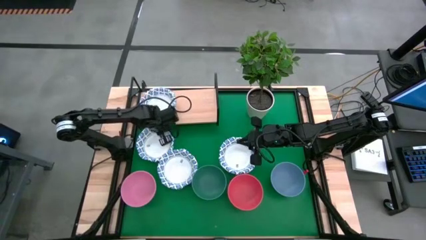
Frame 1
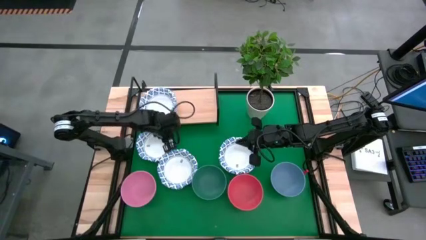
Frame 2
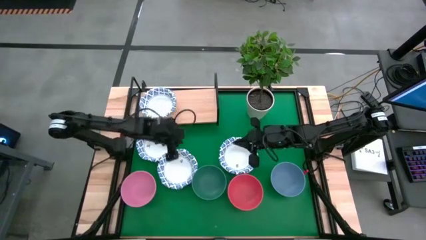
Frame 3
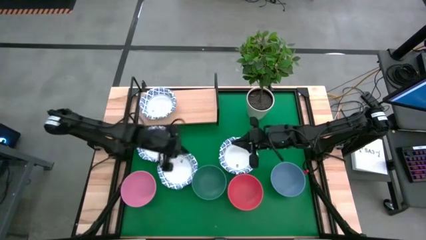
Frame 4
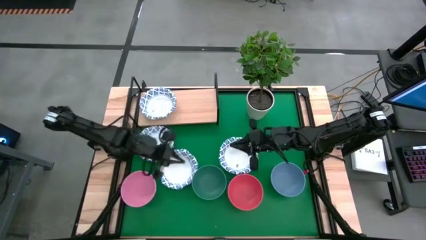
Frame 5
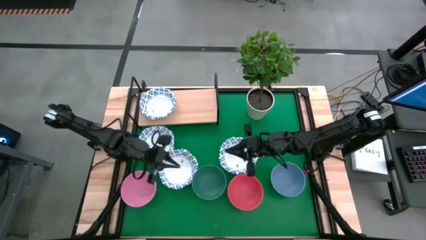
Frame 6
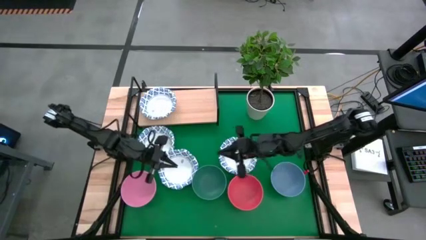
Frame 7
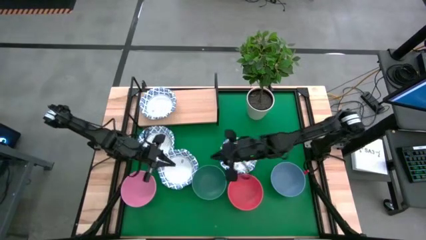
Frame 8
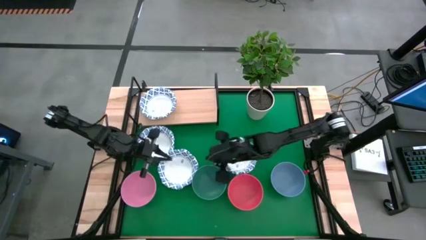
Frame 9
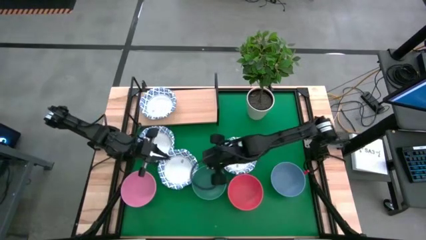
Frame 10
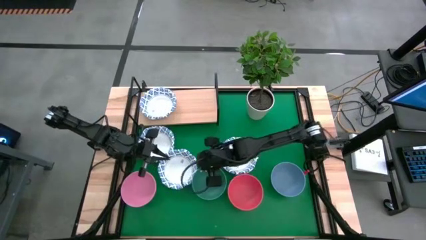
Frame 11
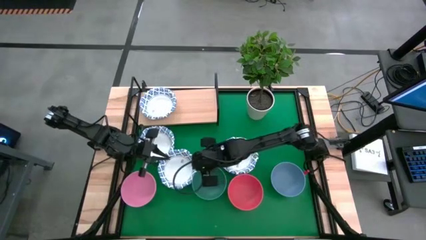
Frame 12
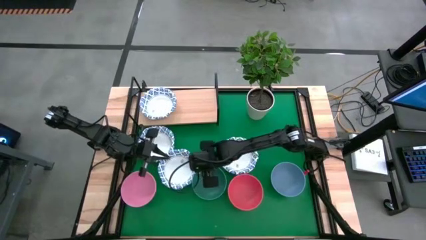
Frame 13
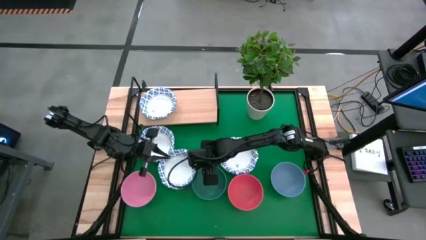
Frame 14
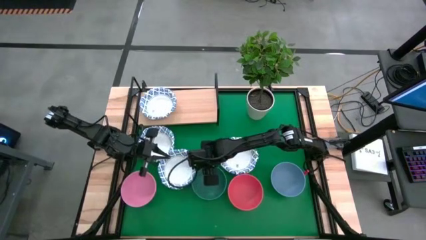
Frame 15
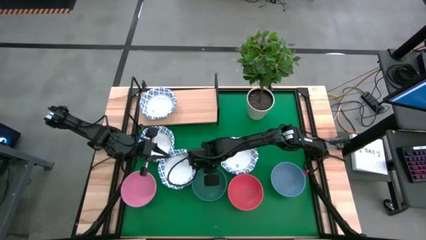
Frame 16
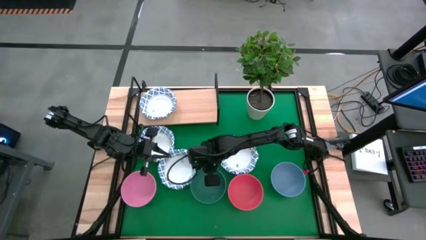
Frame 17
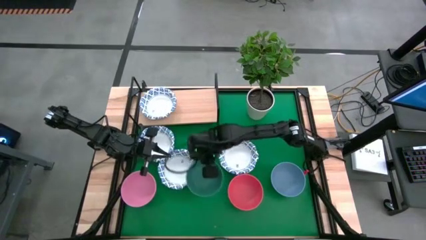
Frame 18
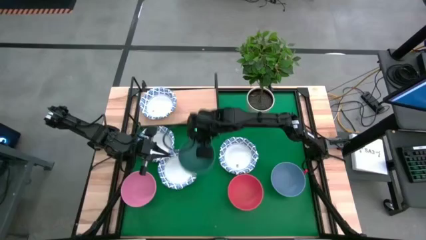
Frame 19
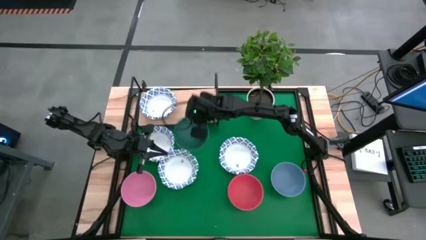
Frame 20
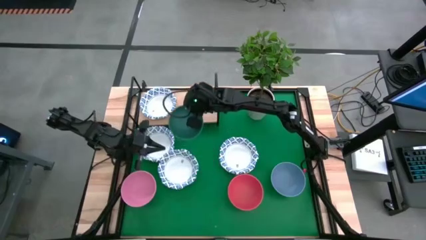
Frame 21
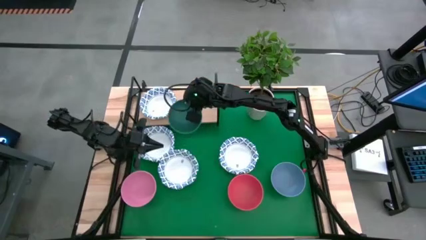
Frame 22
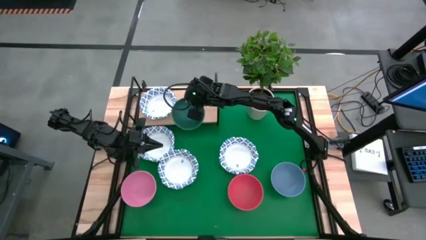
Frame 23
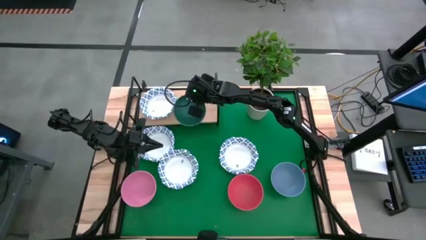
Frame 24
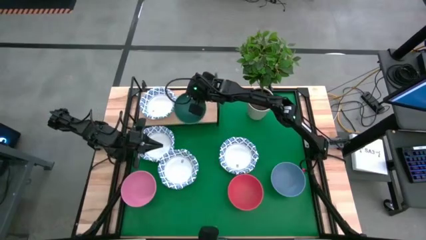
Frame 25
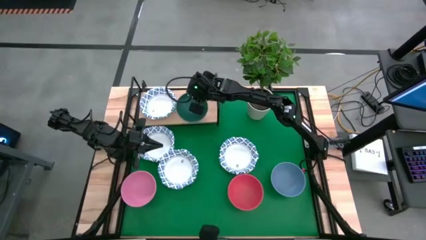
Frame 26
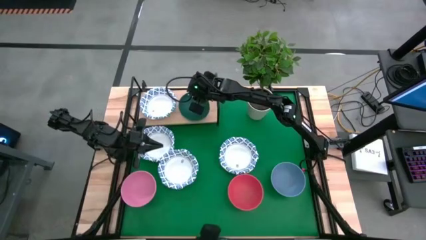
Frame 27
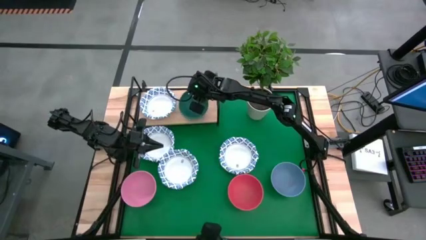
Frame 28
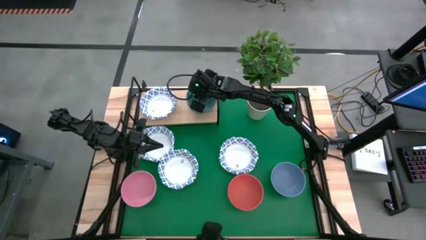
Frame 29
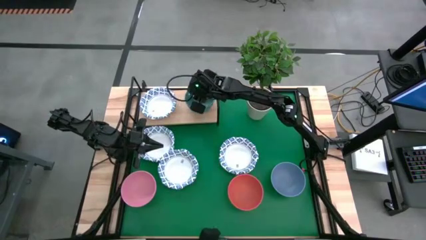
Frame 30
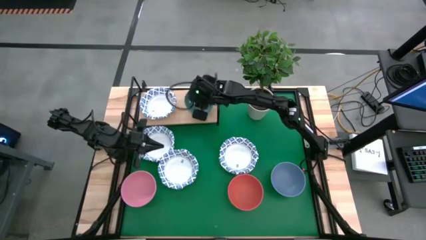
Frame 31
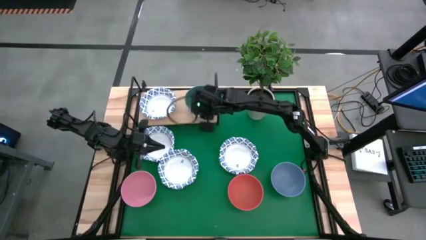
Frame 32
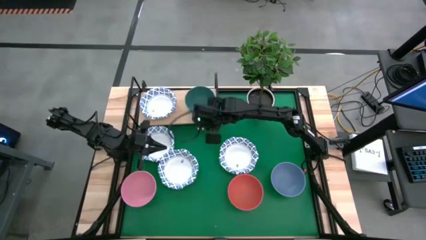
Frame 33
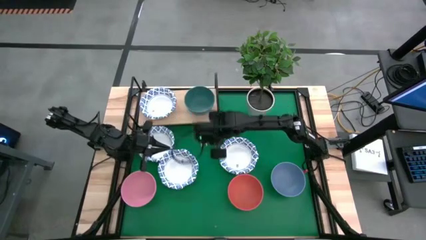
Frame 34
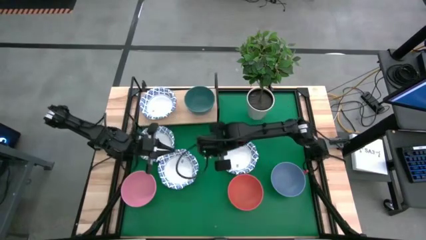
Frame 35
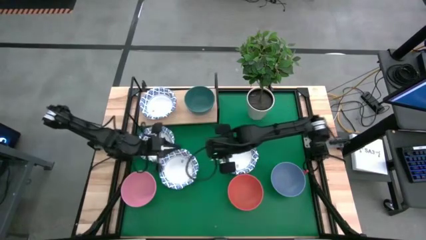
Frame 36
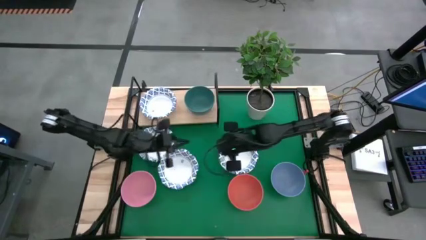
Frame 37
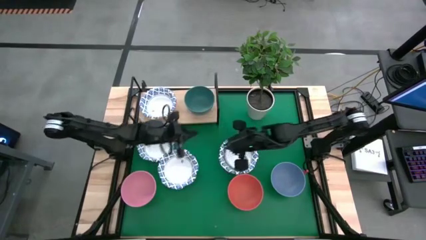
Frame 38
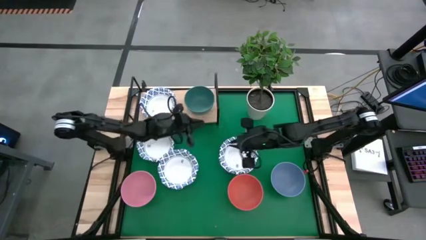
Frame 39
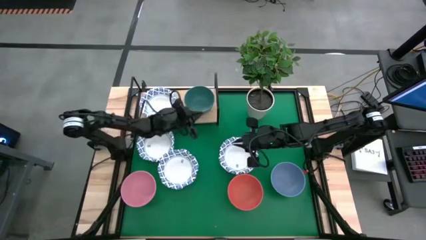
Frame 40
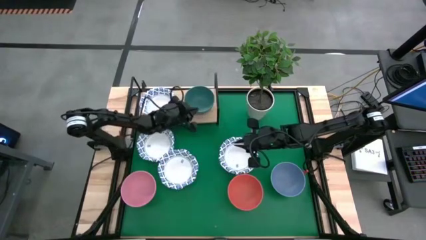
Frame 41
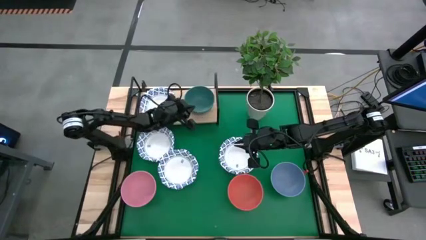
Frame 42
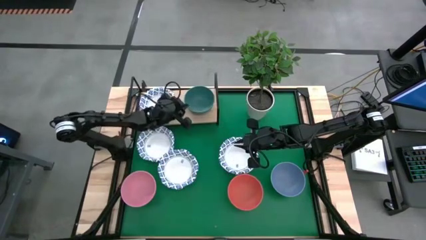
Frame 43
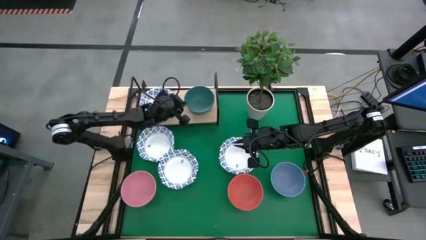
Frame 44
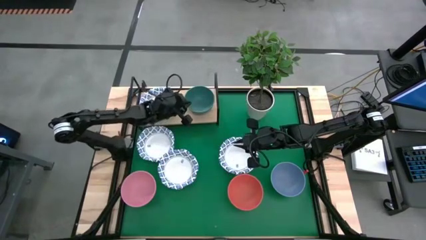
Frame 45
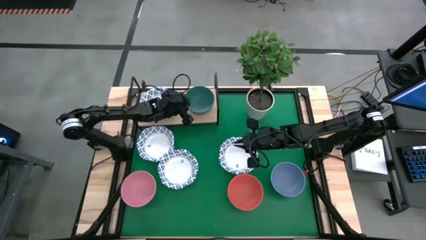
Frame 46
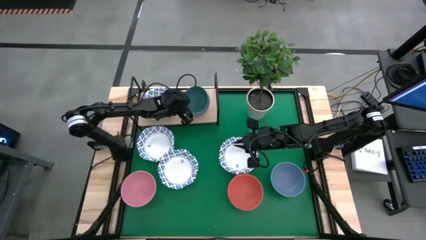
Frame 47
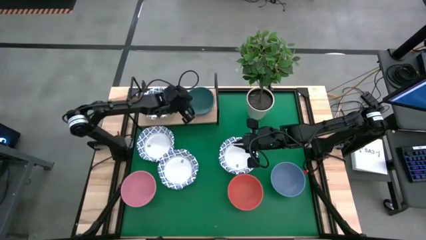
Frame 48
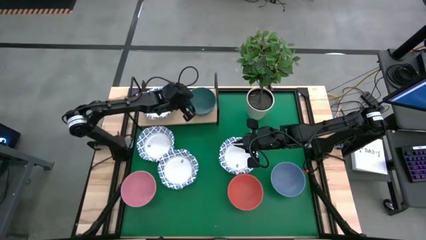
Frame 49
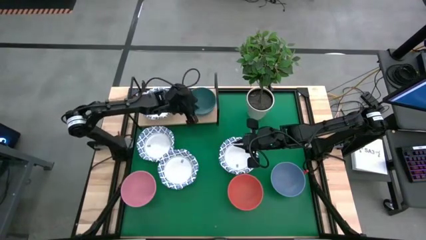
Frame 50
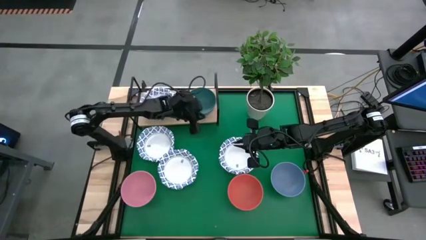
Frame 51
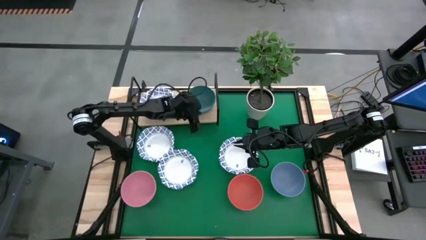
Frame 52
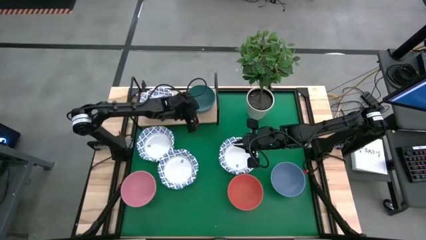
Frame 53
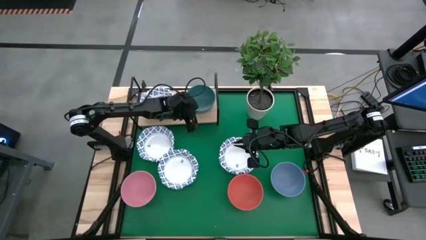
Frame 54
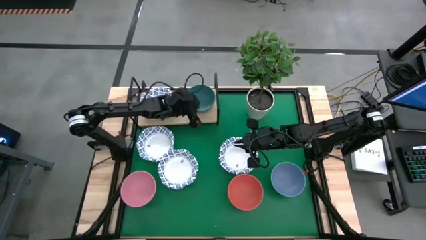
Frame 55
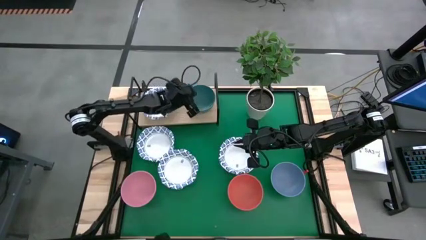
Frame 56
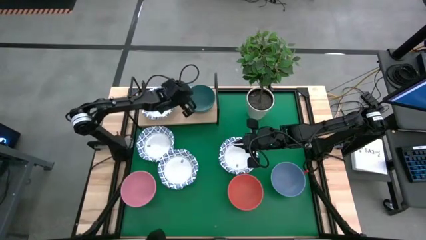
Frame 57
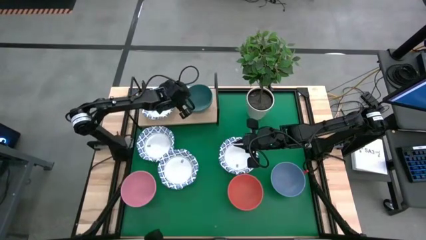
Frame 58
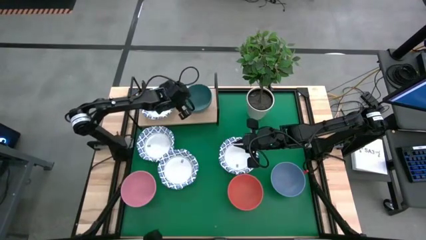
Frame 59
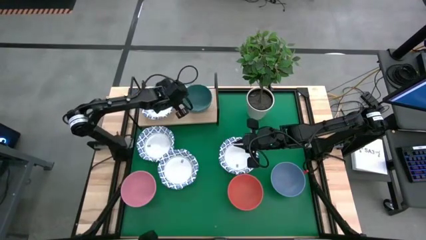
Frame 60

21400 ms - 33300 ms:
Task: Place and stack bowls onto a shelf
Put the green bowl on the shelf

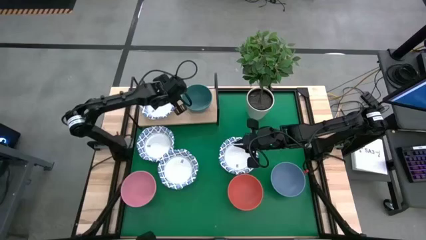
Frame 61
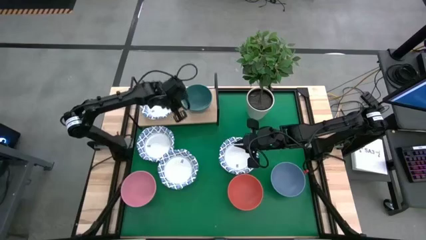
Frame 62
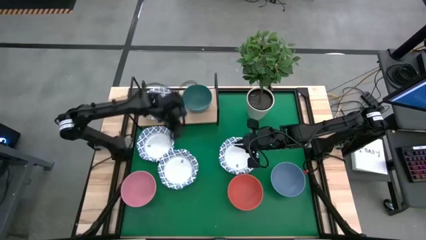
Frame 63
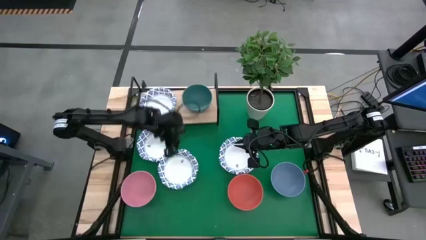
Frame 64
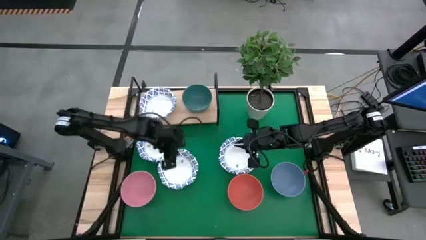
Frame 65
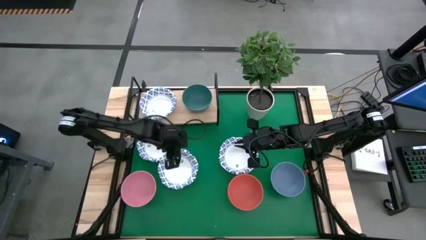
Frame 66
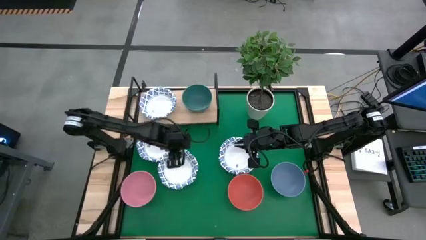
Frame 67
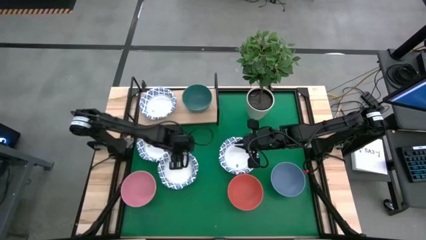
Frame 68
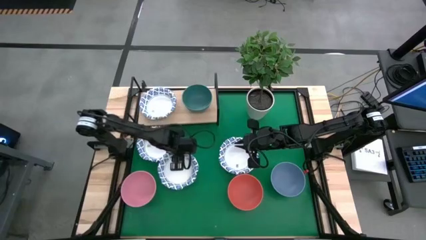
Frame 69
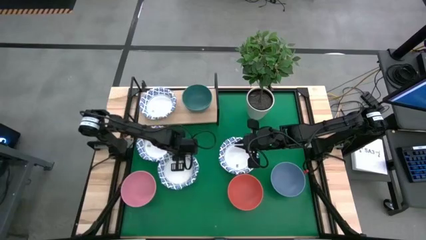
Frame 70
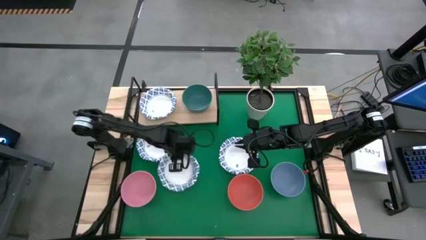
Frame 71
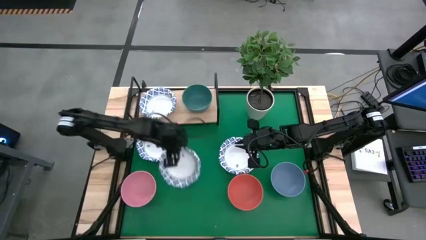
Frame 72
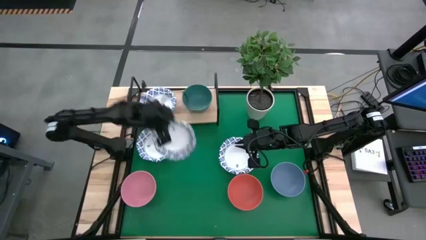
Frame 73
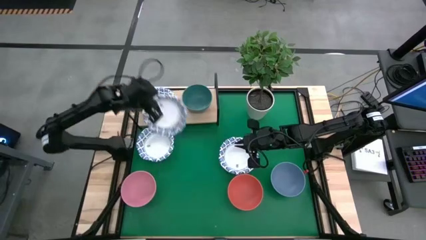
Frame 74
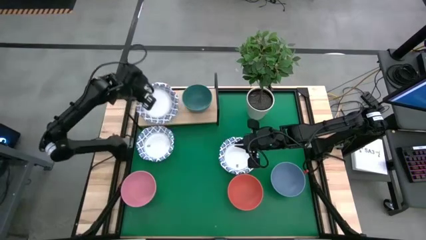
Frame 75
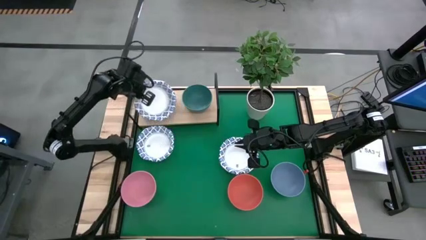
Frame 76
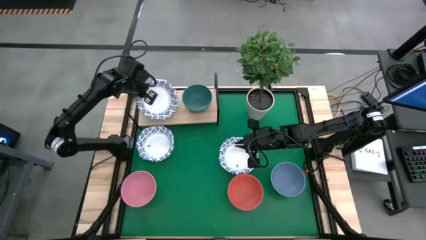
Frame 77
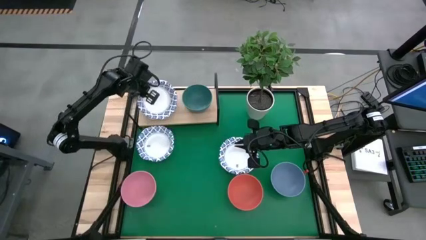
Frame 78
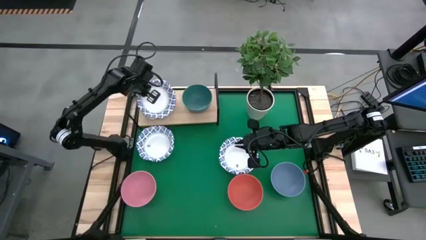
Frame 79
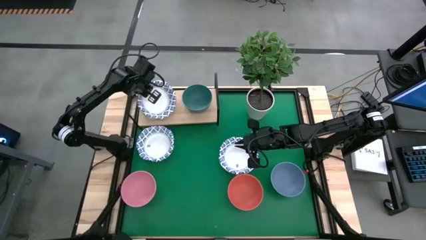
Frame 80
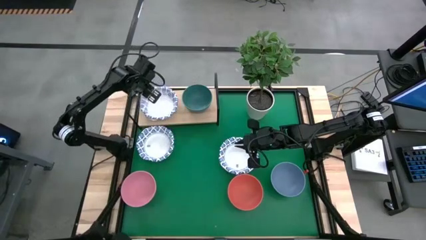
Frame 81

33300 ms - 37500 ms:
Stack the white and blue bowl on top of the white and blue bowl
